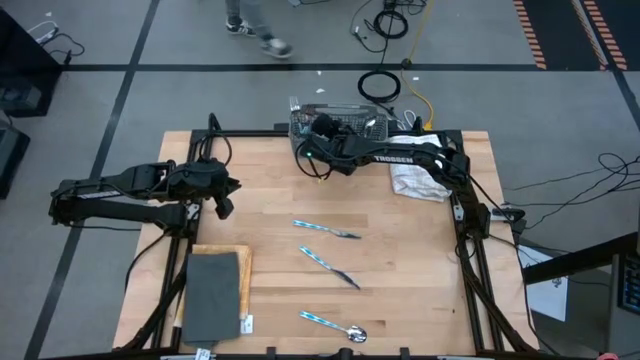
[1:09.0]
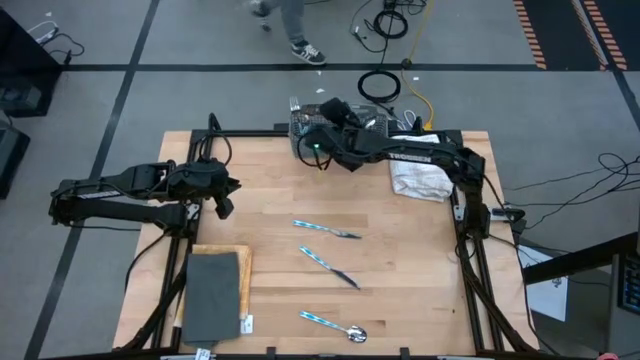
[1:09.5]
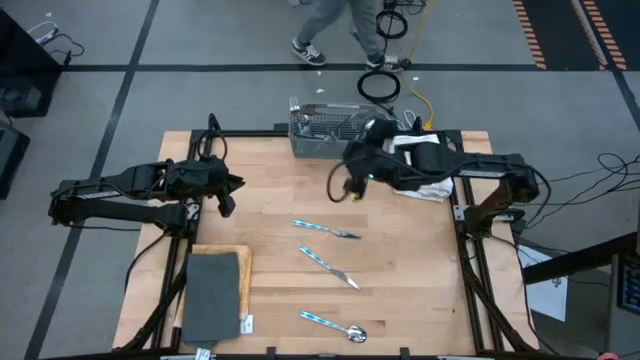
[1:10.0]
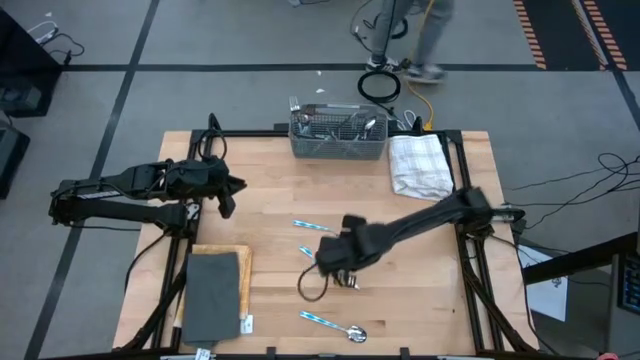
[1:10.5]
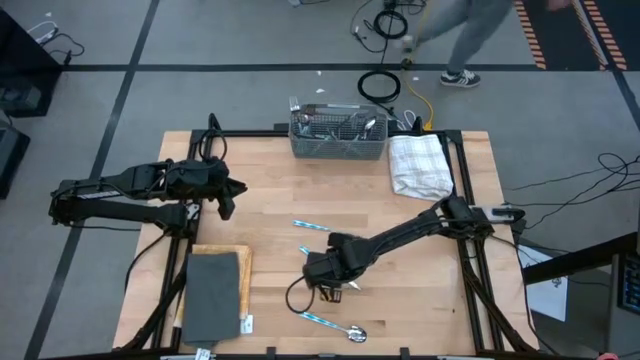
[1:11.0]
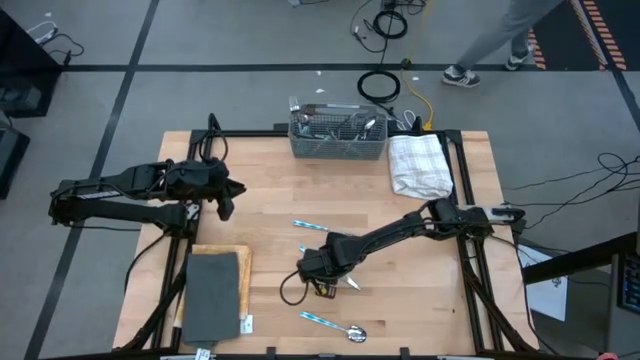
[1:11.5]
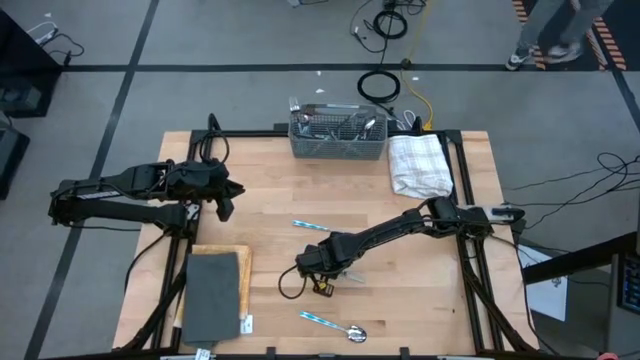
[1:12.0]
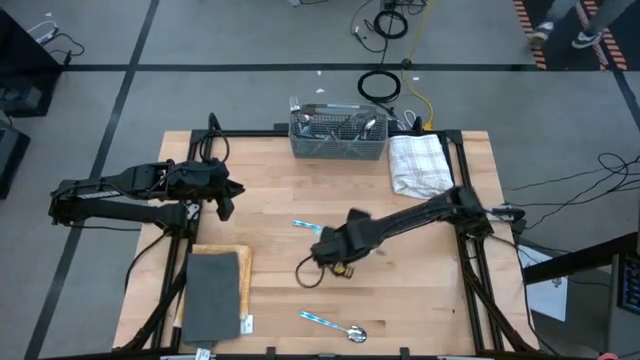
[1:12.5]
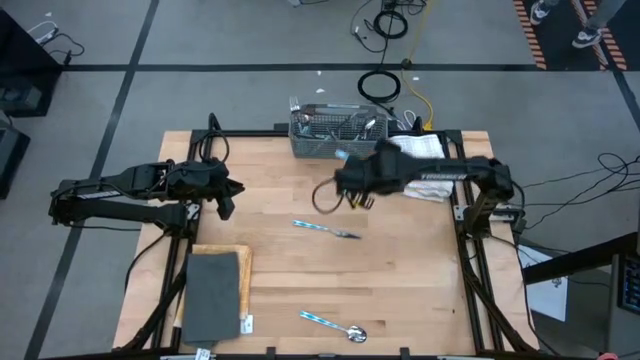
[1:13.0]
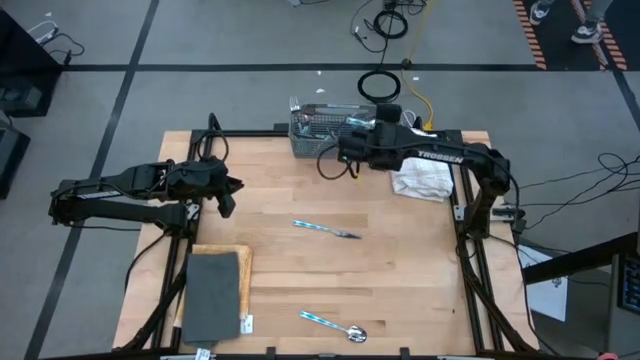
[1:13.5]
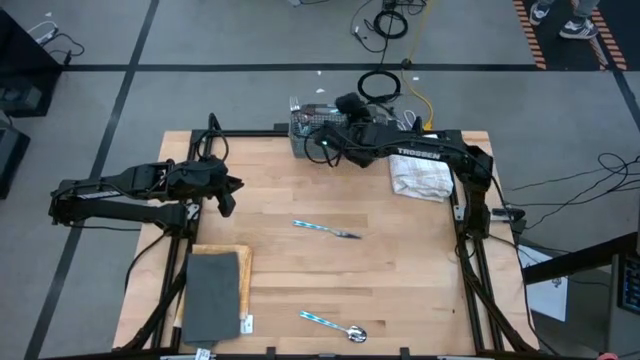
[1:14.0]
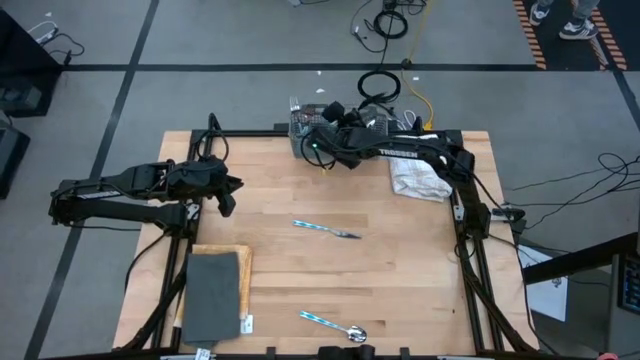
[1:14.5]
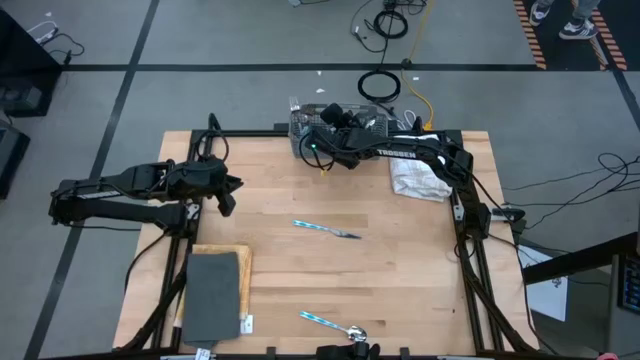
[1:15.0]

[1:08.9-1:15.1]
Task: Sort silverware
Put the knife into the silverware basket

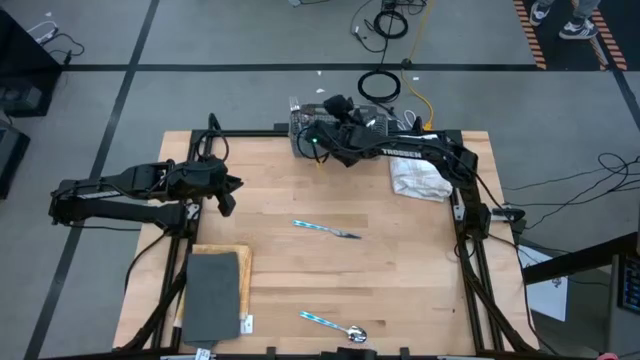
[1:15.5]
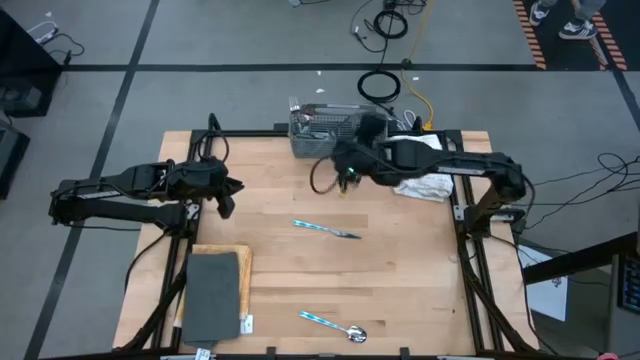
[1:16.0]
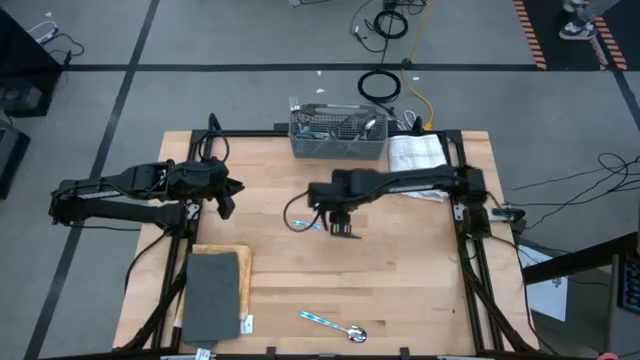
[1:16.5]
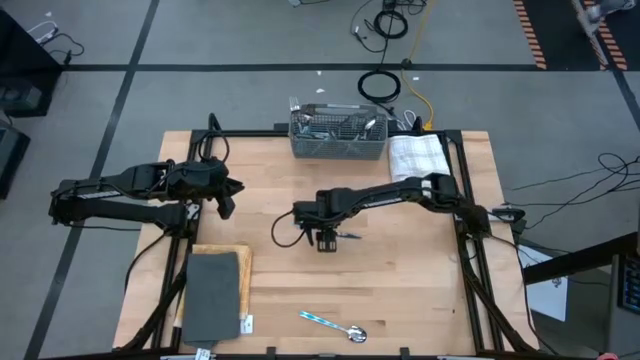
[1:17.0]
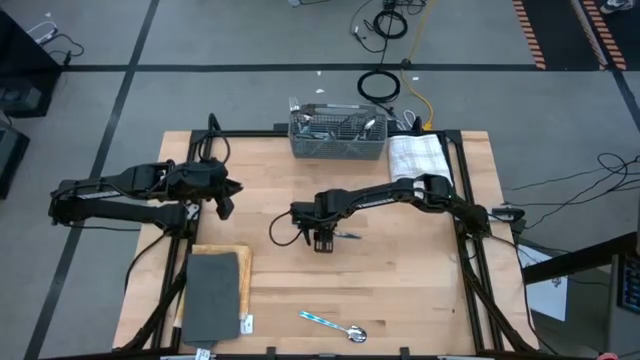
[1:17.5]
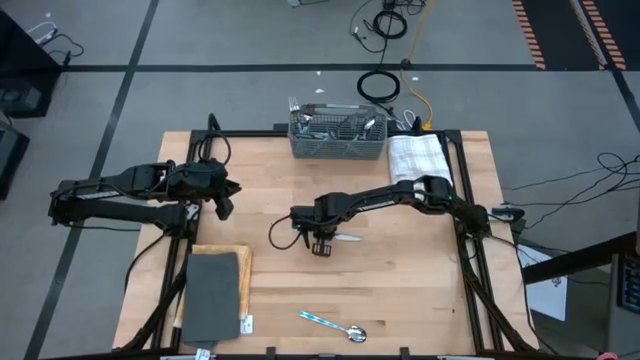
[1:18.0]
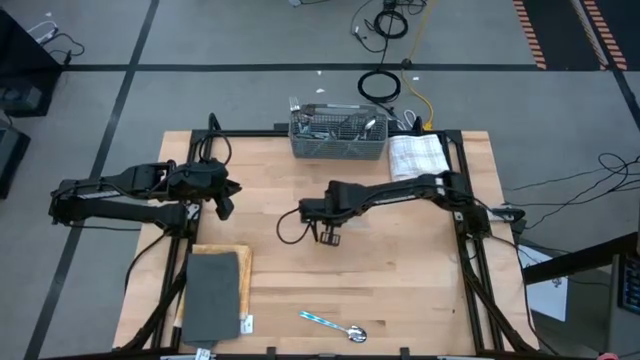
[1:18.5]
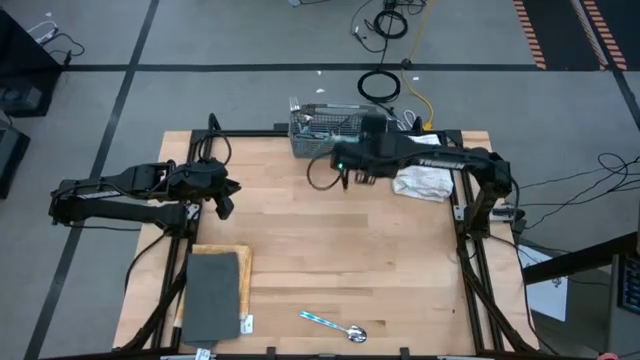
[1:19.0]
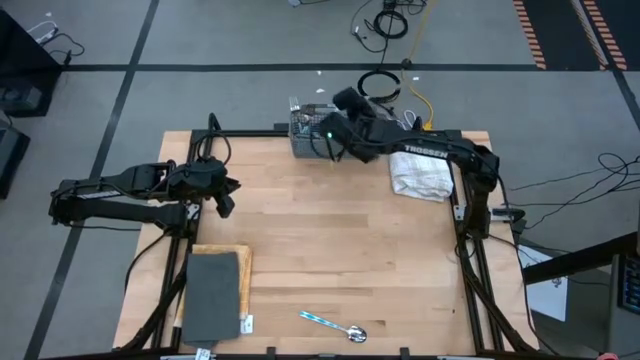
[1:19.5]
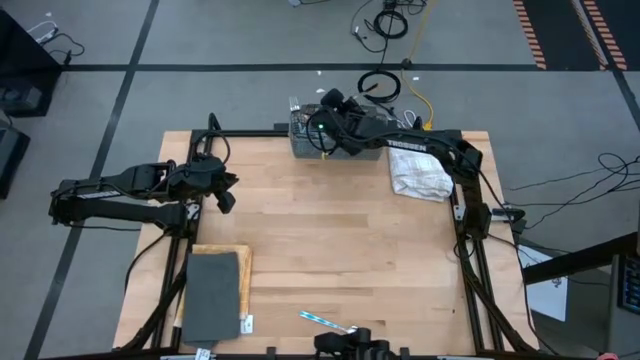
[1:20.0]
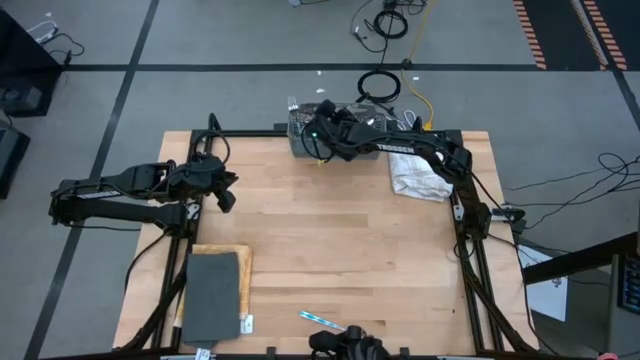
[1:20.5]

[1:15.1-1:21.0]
Put the knife into the silverware basket

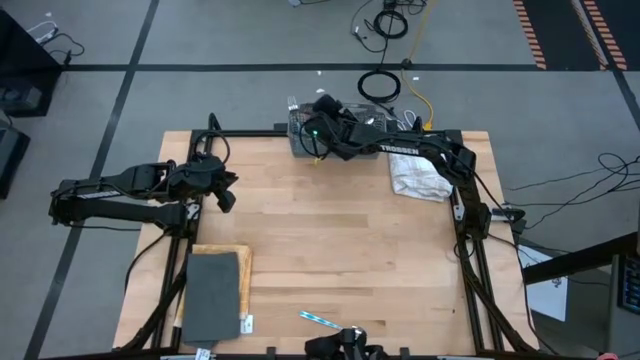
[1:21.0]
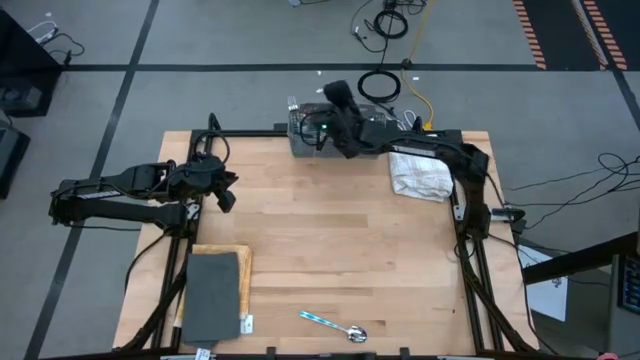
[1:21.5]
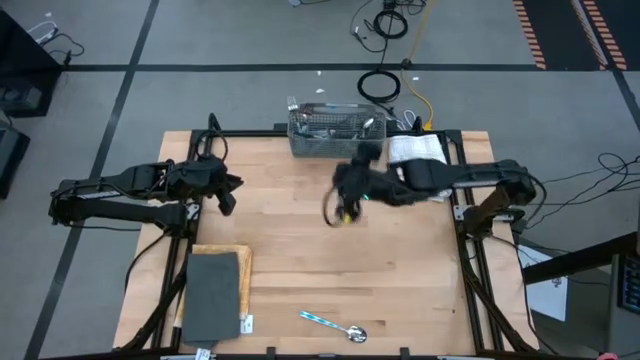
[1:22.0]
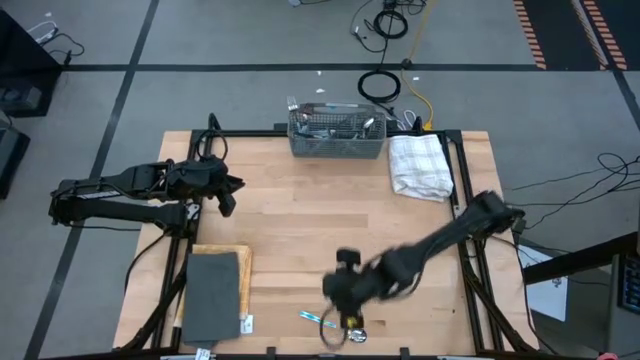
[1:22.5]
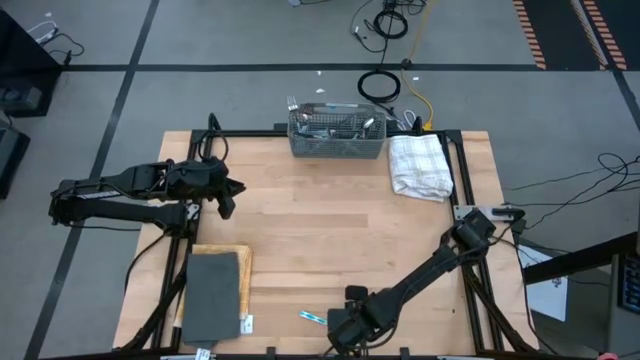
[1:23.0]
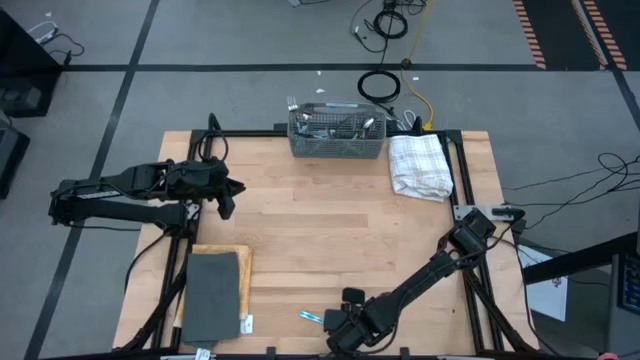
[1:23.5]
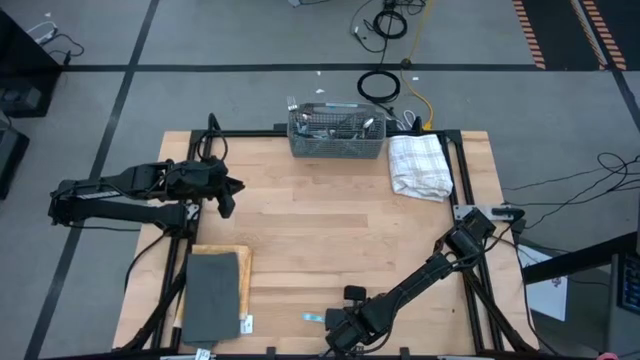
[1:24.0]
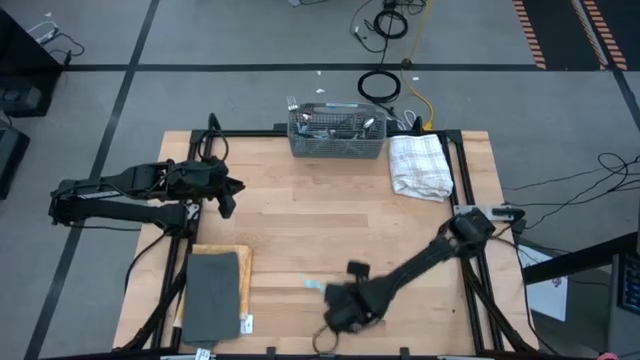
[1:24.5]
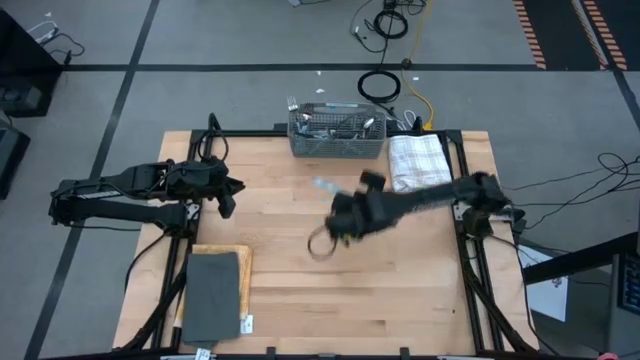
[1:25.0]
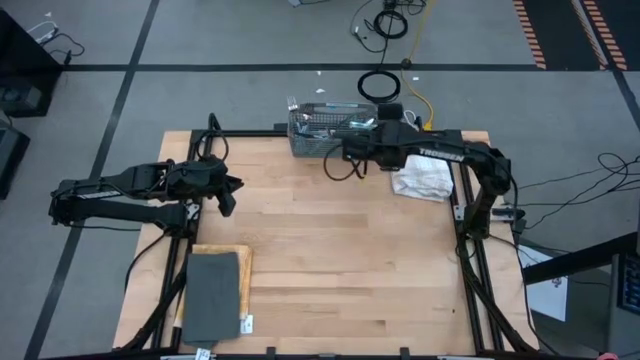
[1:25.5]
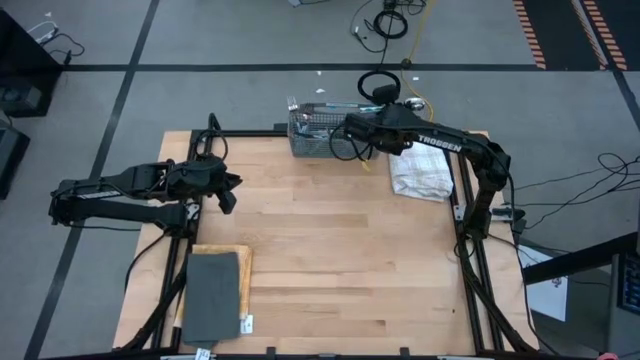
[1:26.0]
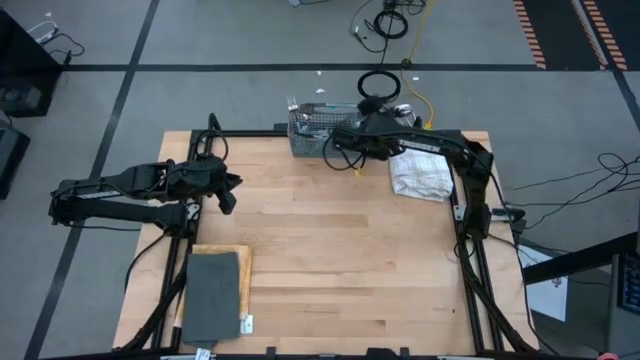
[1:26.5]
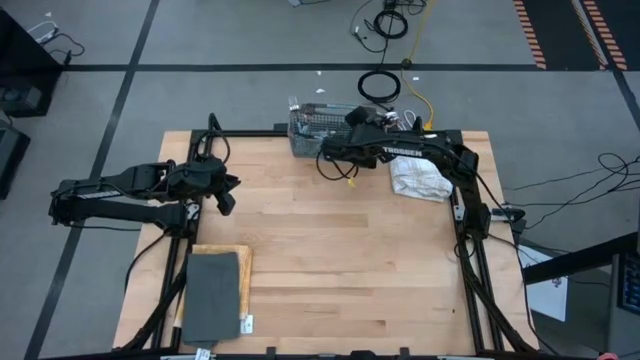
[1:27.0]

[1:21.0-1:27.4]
Put the spoon into the silverware basket
